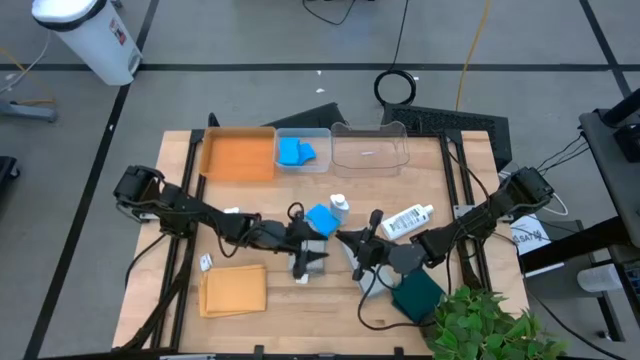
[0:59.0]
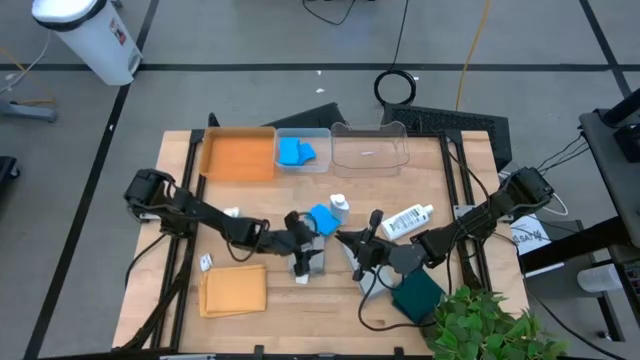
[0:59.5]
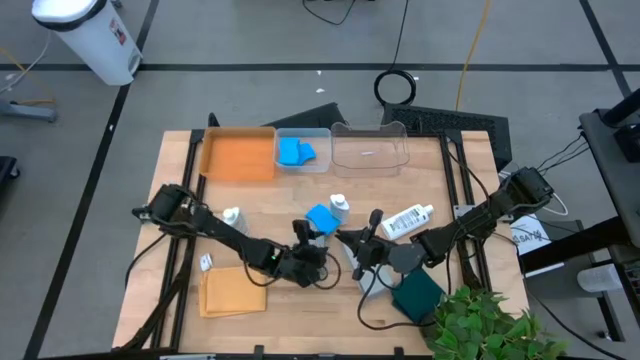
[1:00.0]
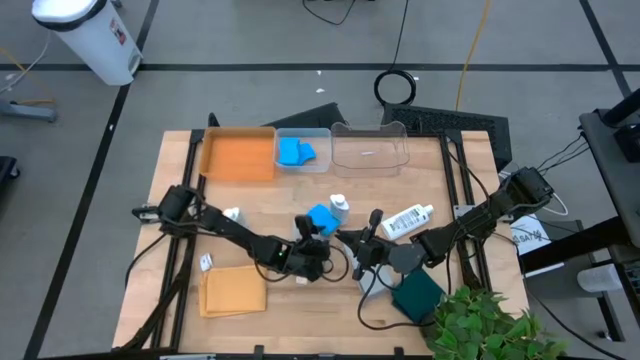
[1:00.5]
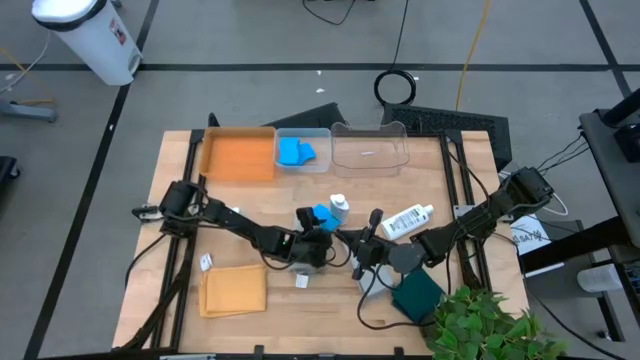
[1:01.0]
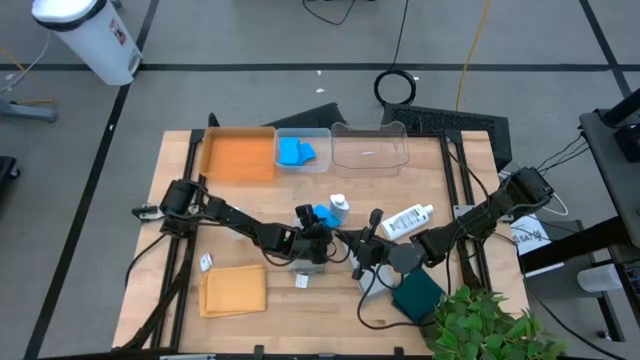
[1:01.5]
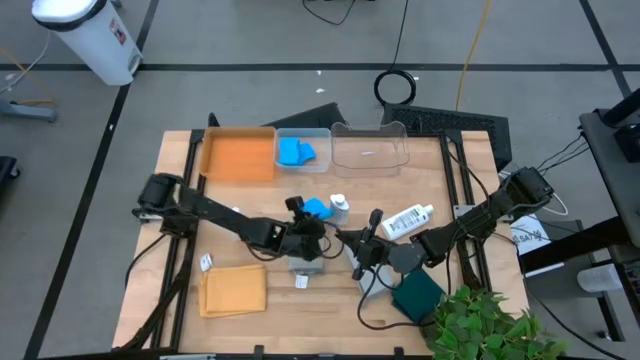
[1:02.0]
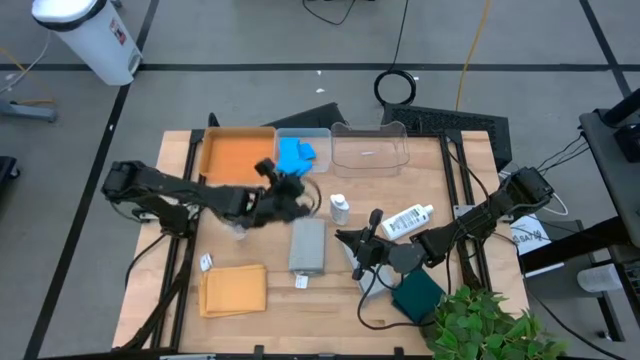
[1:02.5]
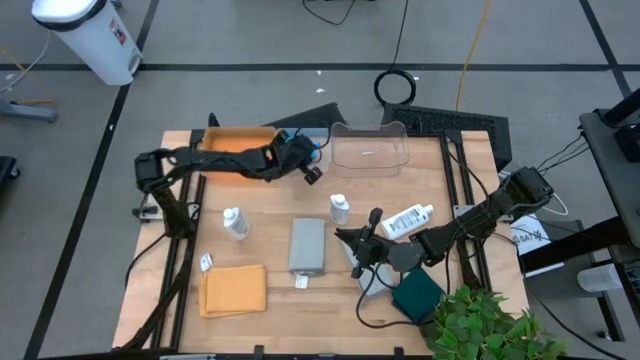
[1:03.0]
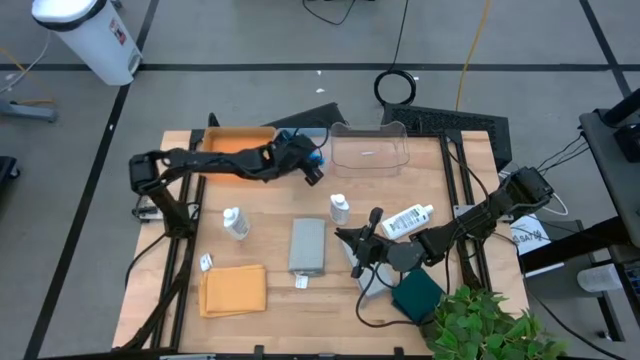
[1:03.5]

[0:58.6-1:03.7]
Task: Pick & Place Kitchen Items
Put the blue sponge into the left transparent bin

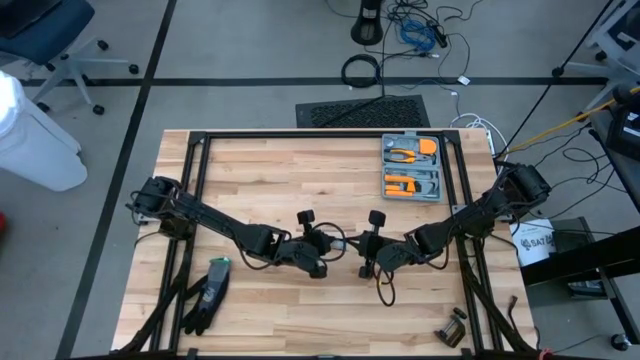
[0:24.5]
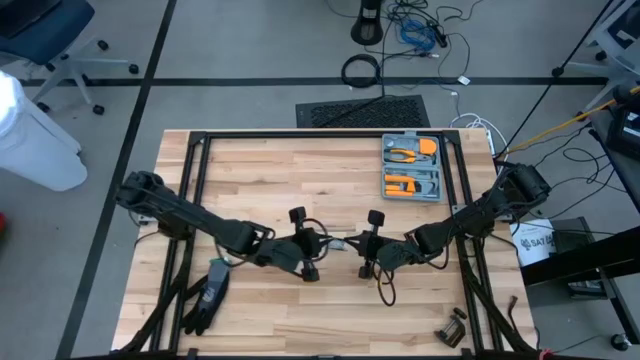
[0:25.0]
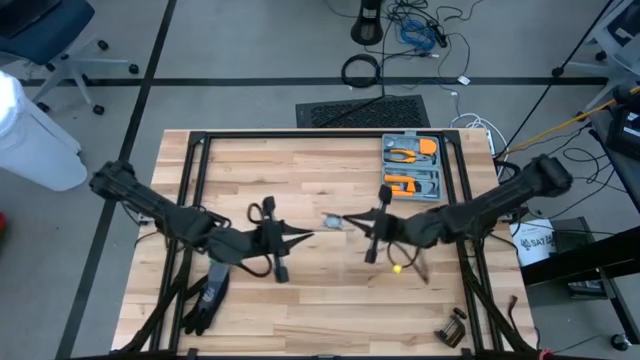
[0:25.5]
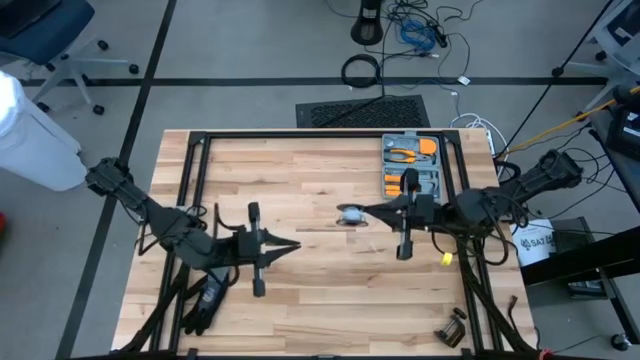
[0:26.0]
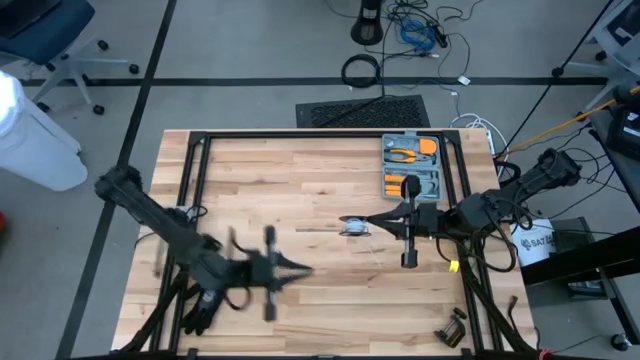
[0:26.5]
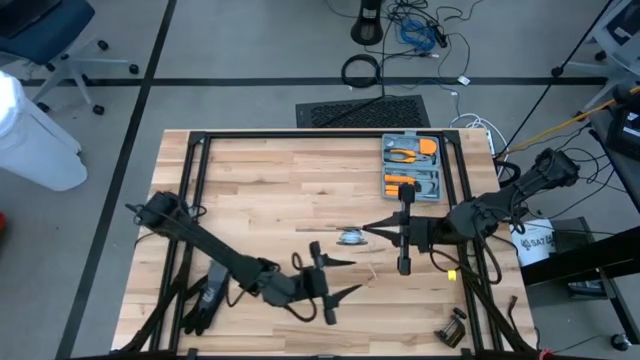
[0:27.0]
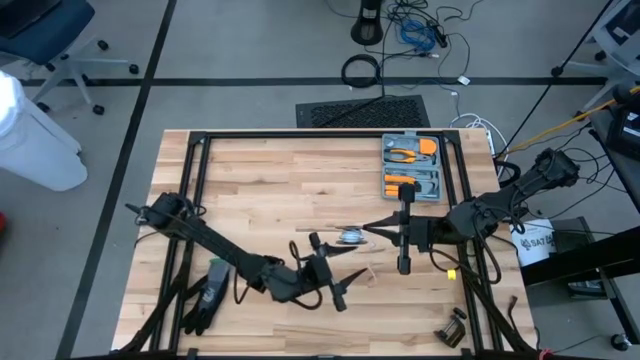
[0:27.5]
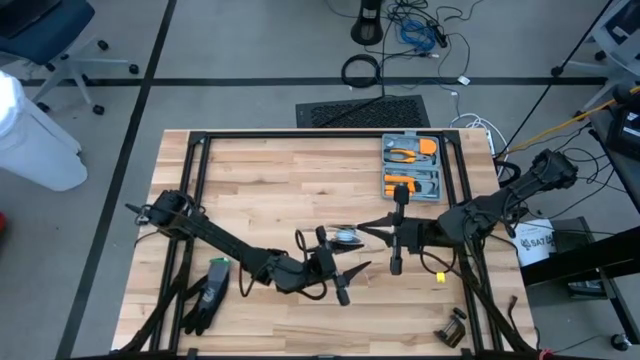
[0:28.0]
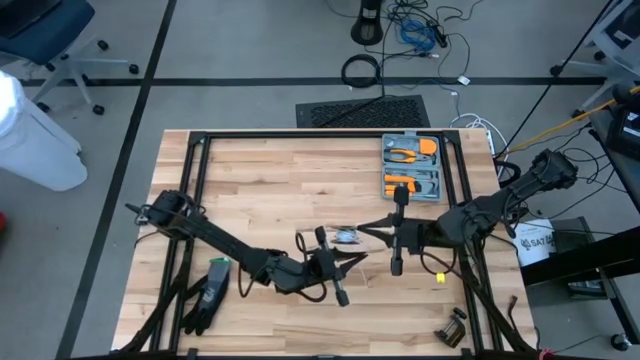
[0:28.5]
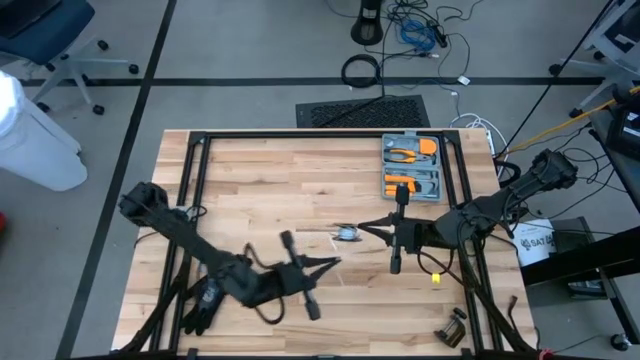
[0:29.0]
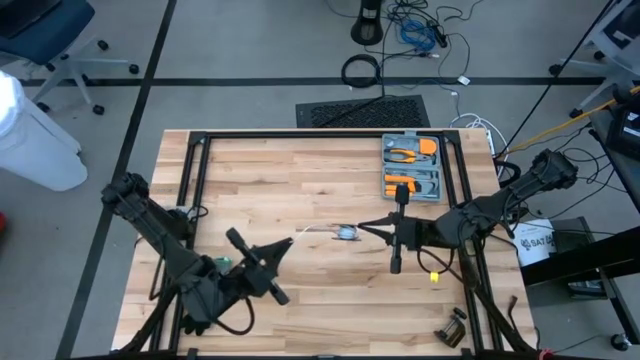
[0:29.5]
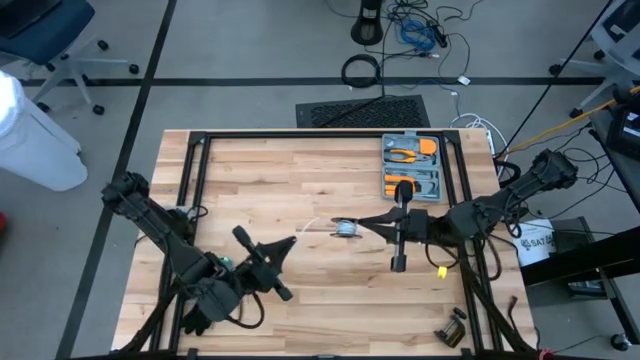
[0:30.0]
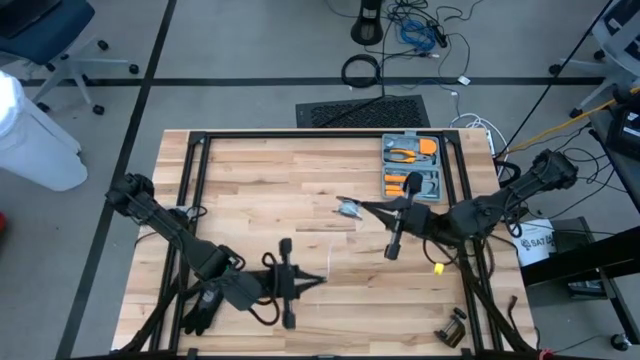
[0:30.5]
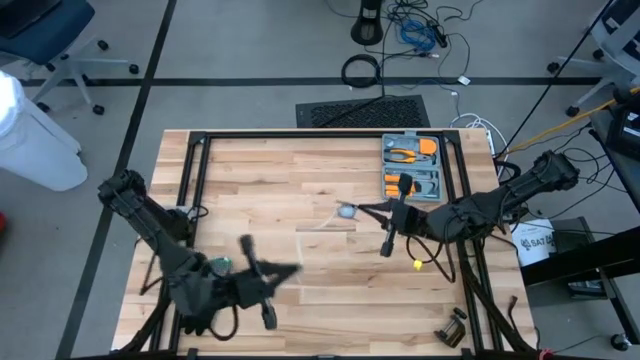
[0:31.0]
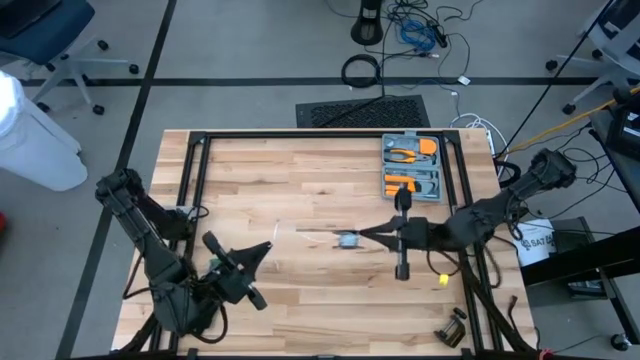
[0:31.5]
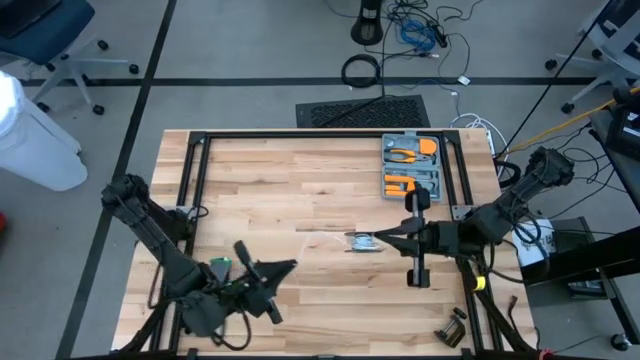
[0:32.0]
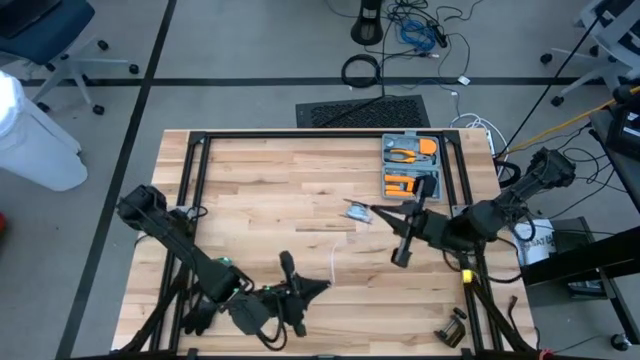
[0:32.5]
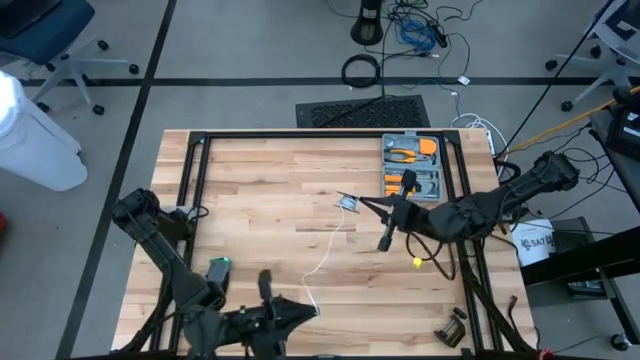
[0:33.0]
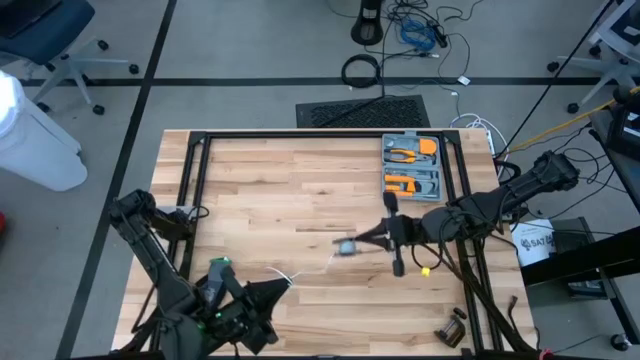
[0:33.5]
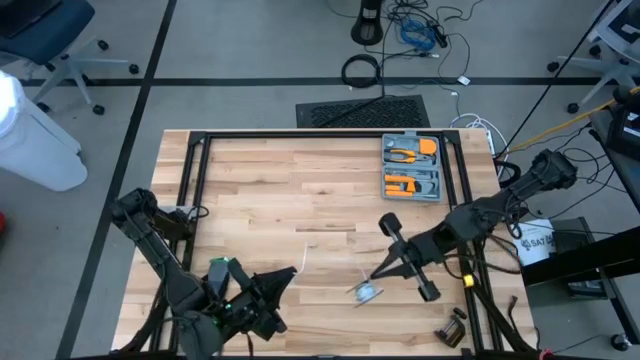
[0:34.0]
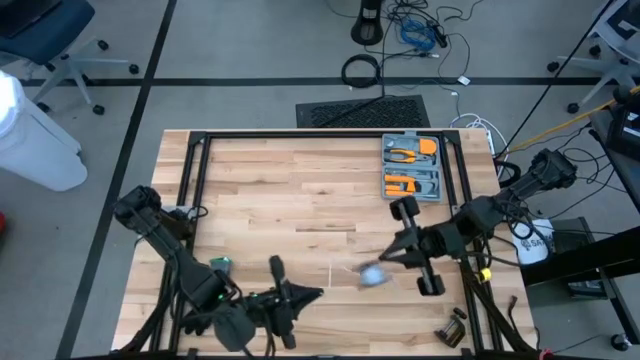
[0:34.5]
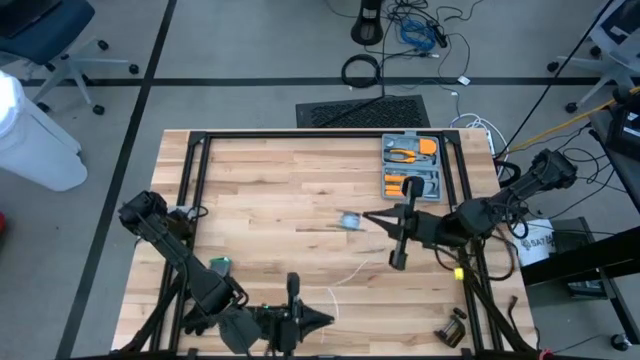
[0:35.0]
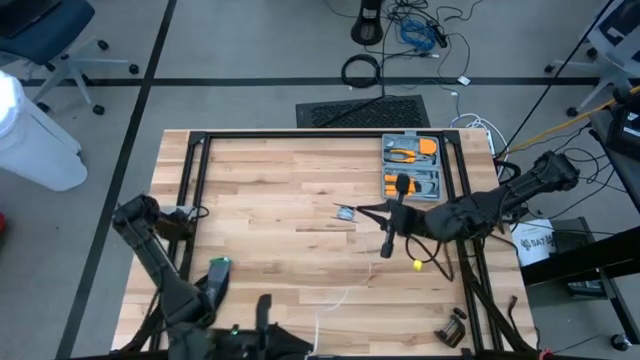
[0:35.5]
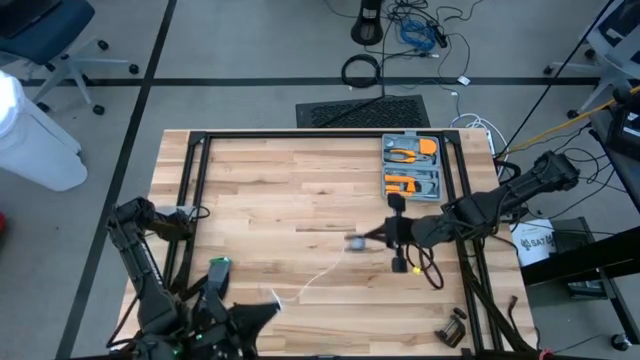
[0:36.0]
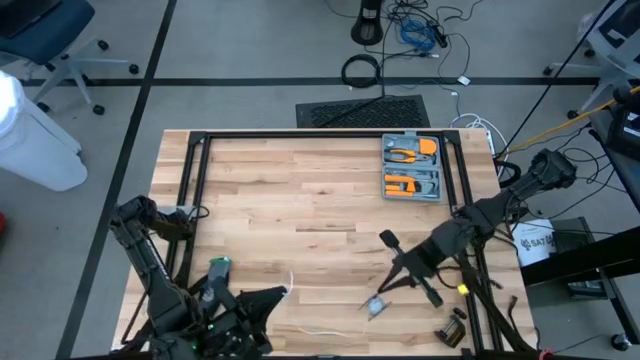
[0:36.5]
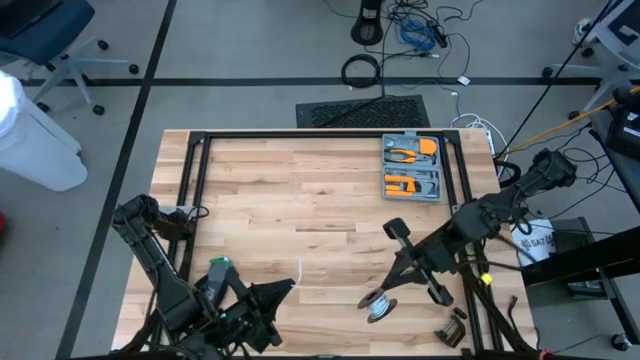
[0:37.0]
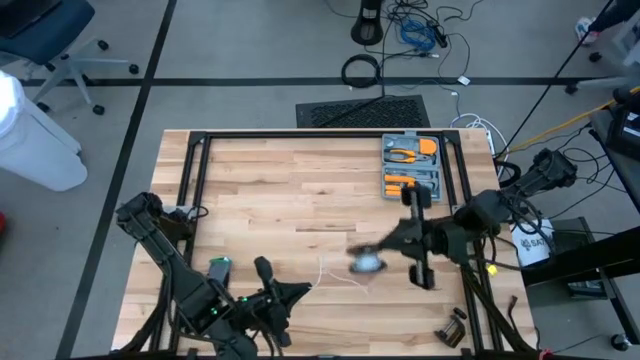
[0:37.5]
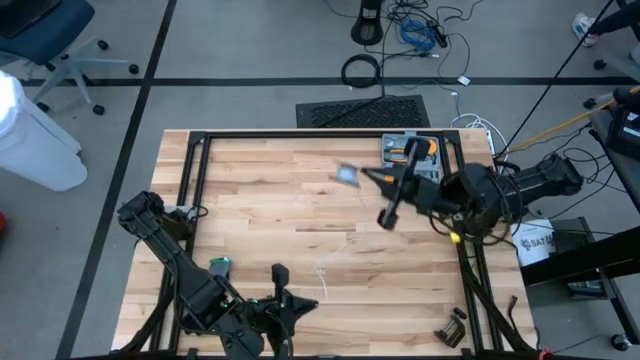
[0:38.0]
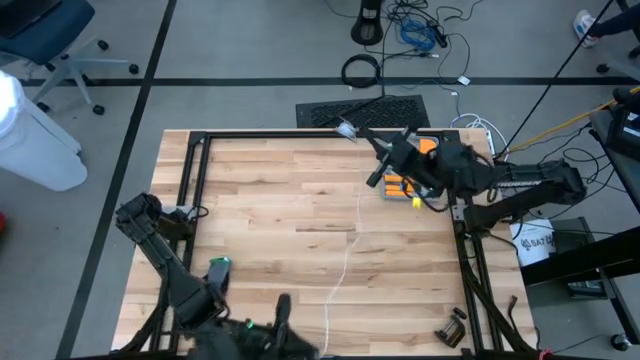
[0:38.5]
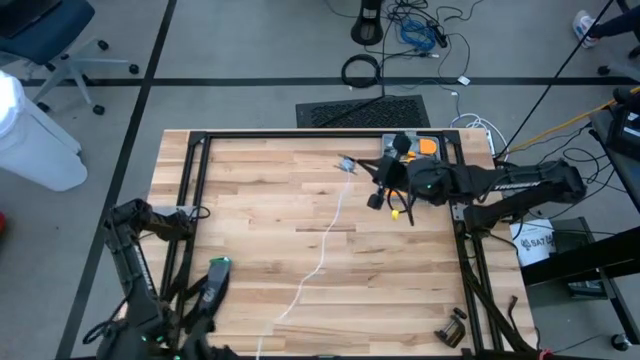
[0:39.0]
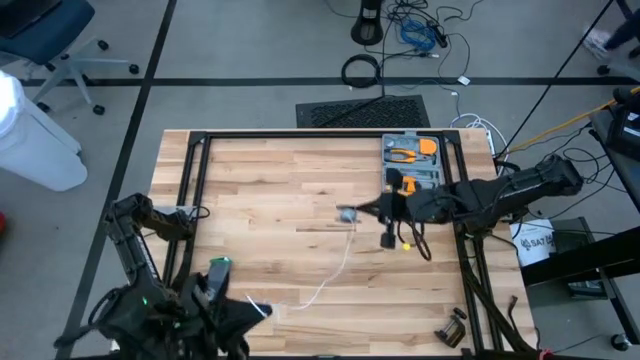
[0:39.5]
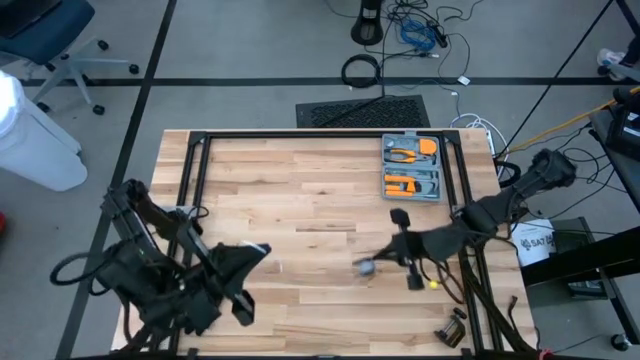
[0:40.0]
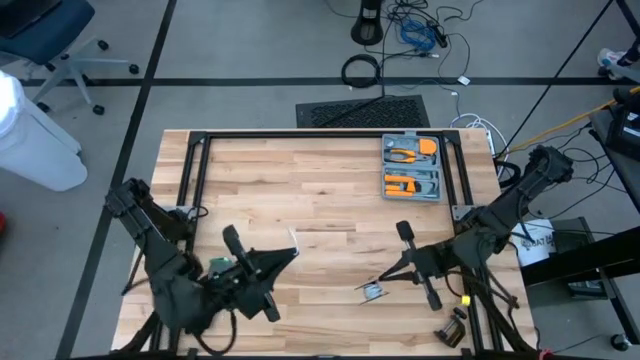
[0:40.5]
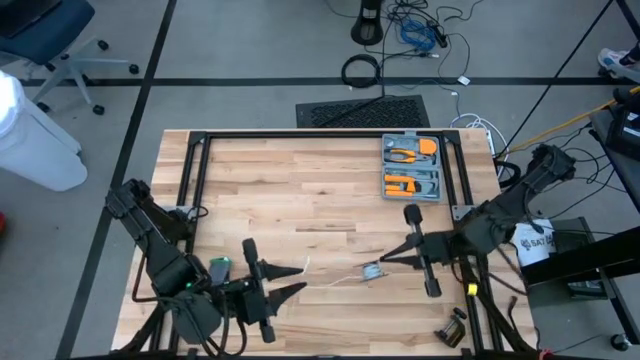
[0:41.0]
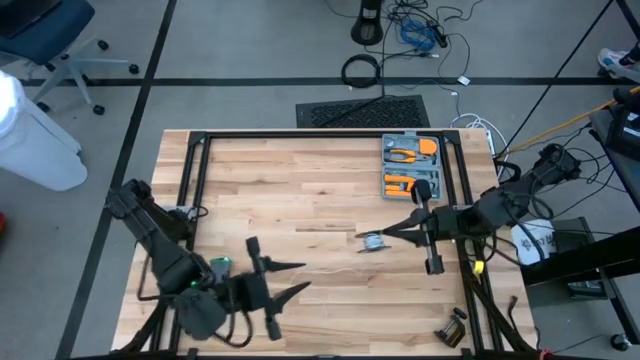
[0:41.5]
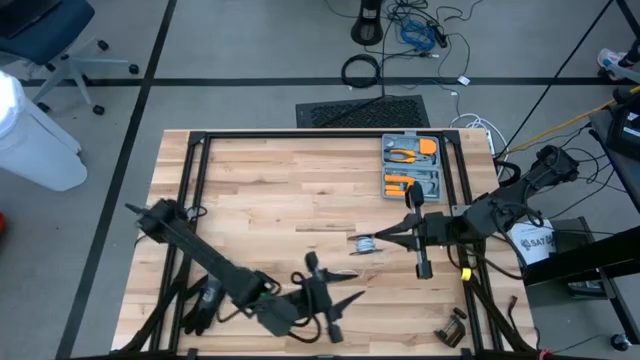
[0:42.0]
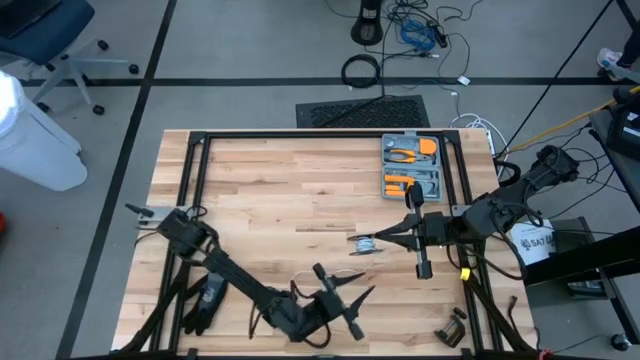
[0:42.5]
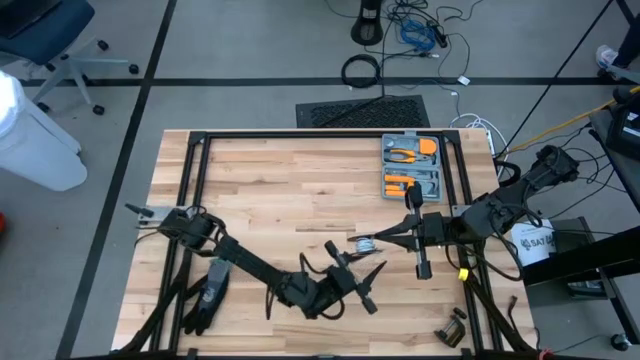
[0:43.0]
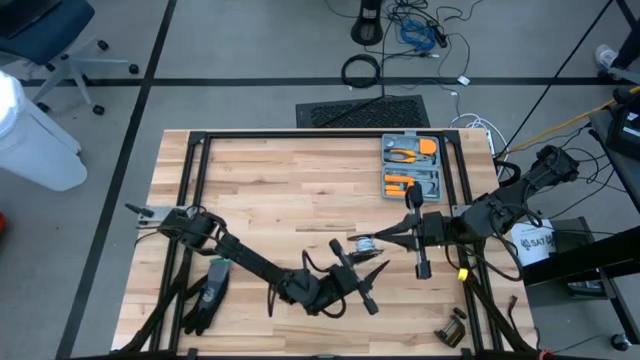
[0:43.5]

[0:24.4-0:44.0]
Task: Coil cords
Uncoil the white wire from the spool
